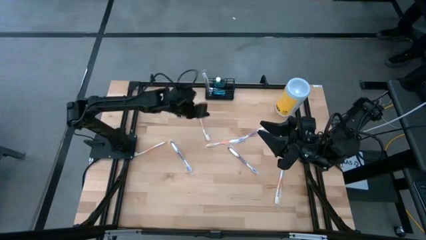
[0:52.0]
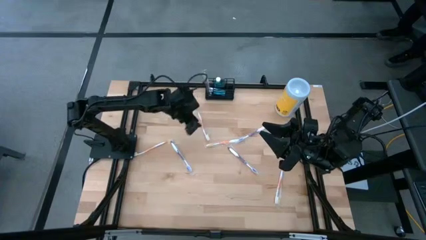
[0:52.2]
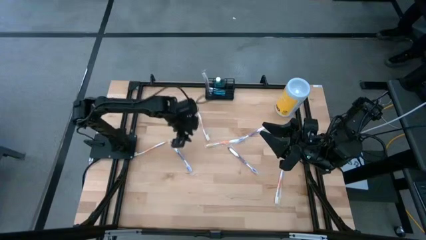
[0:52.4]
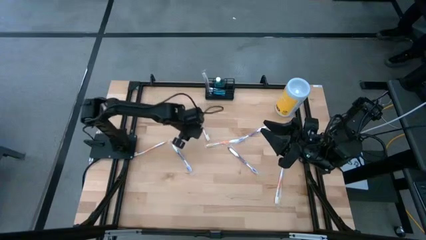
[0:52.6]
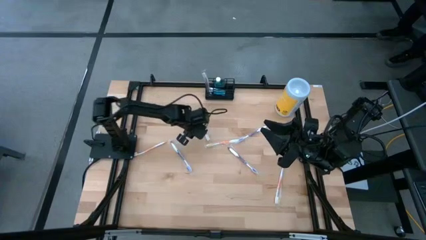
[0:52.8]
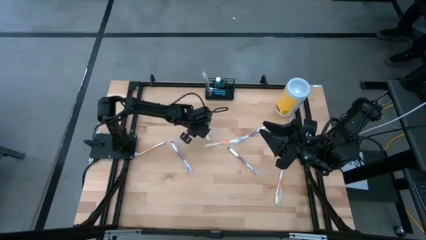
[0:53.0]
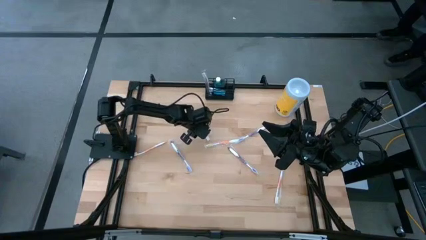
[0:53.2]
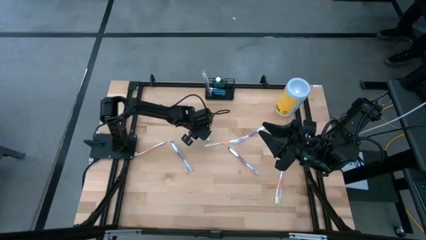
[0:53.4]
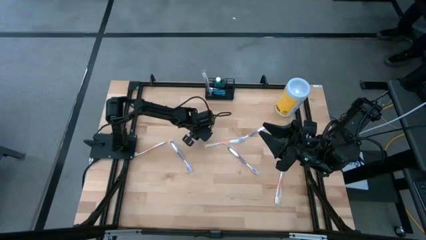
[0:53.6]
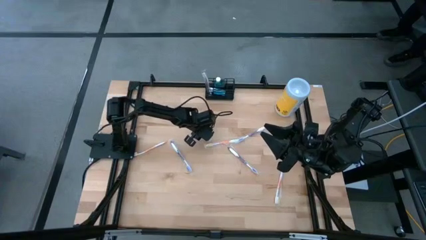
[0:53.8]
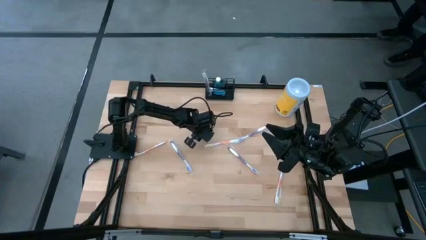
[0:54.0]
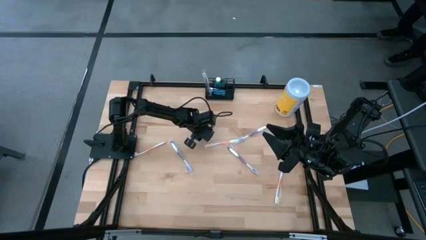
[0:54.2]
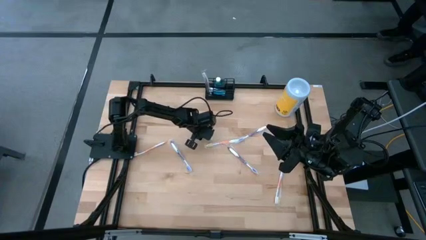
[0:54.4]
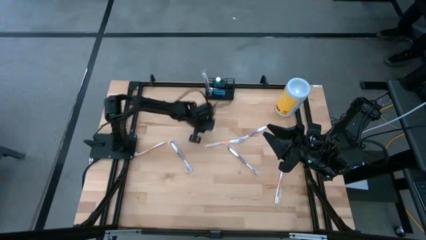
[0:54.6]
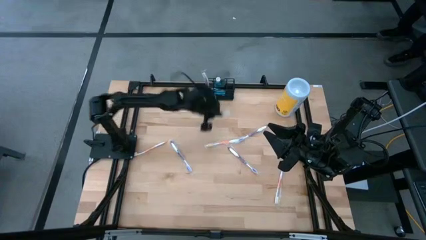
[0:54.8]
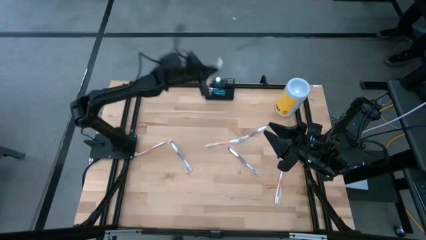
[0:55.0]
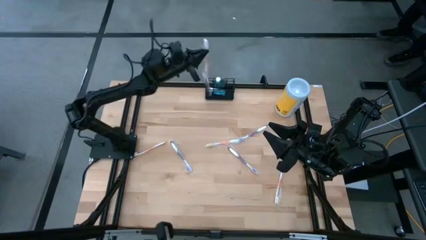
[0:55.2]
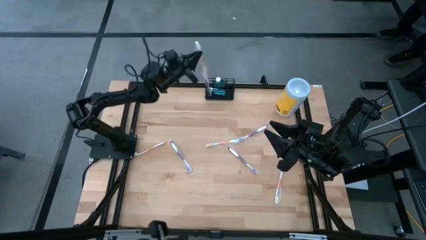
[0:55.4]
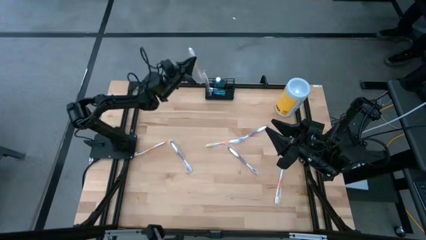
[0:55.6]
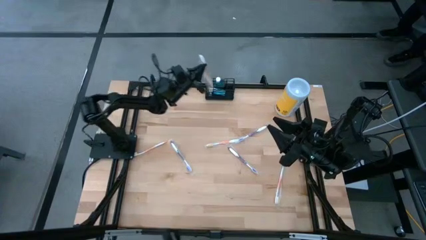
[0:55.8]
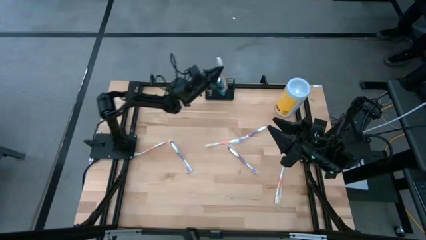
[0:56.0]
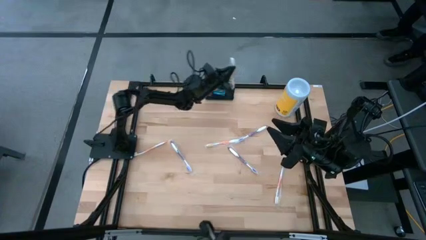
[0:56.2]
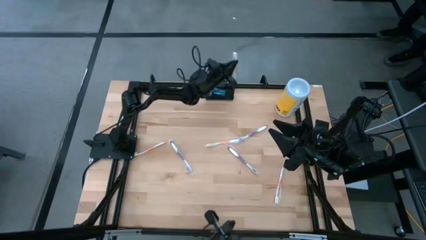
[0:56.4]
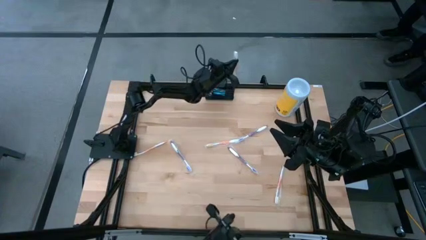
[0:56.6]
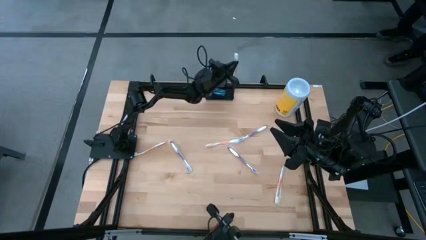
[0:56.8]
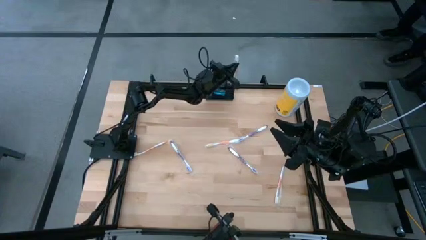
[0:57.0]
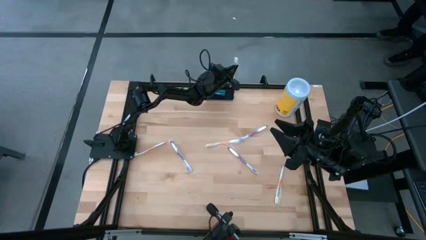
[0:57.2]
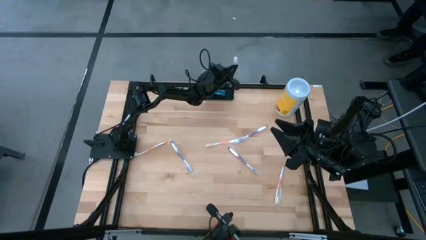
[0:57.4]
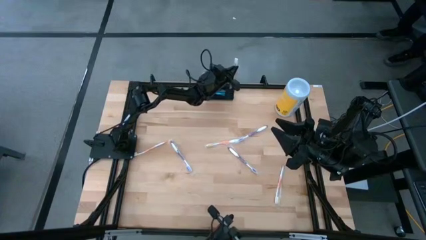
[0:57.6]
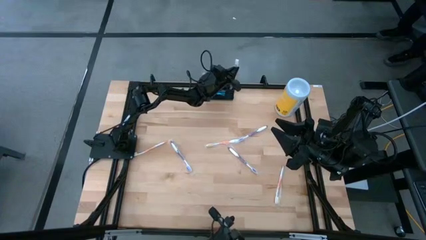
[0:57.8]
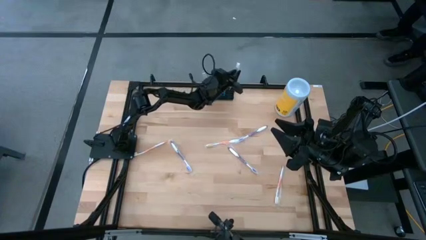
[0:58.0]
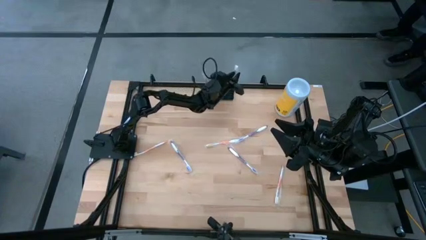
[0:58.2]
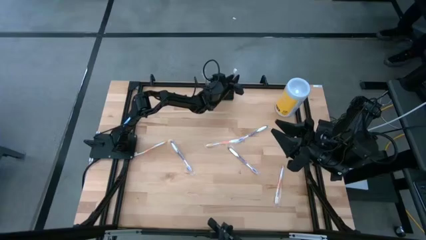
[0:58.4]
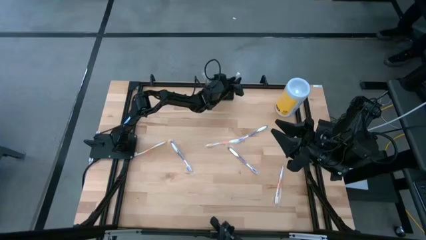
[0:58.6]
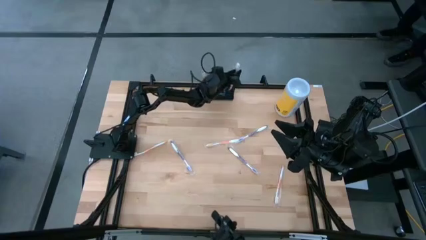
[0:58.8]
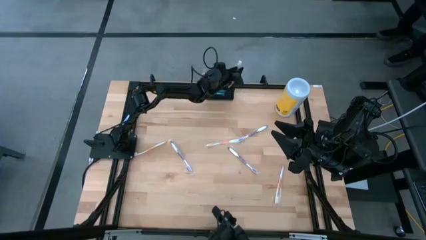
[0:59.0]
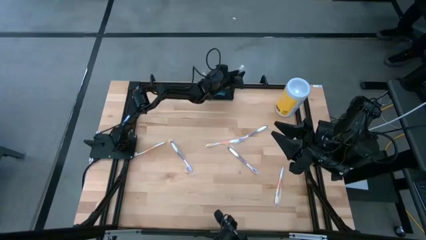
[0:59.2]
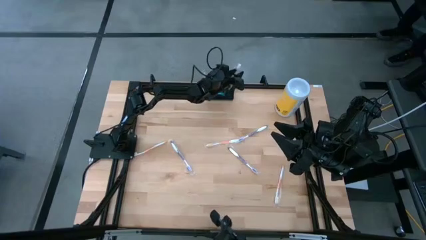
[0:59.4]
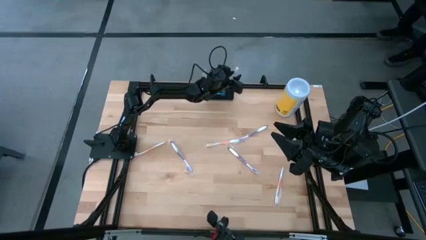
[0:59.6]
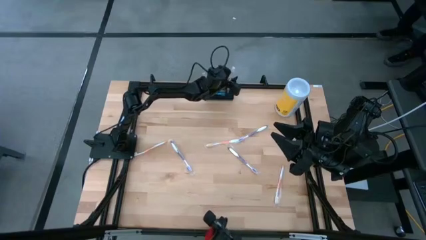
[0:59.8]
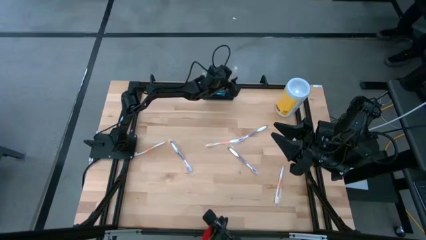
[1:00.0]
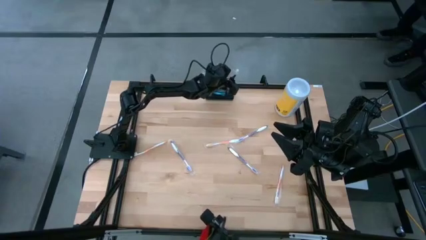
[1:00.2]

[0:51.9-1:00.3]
Task: Pick & Place toothbrushing station
Put the orange toothbrush into the black wire organizer bin

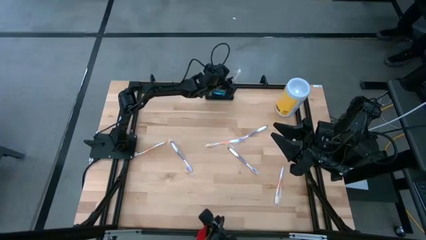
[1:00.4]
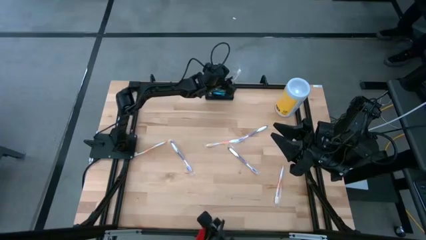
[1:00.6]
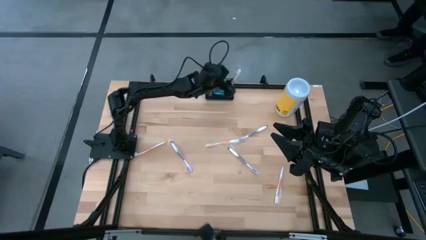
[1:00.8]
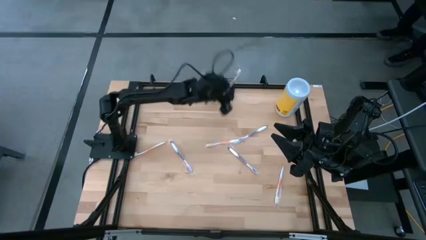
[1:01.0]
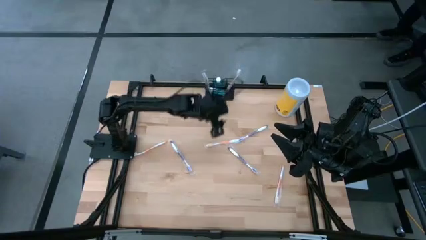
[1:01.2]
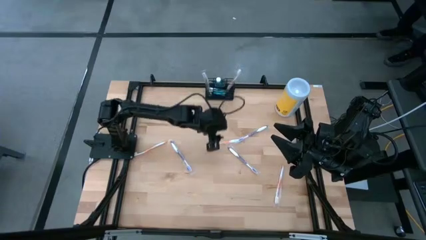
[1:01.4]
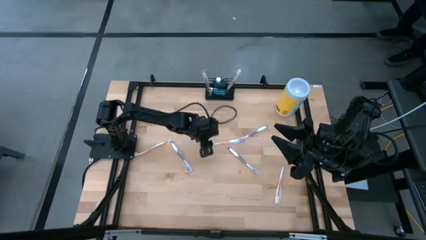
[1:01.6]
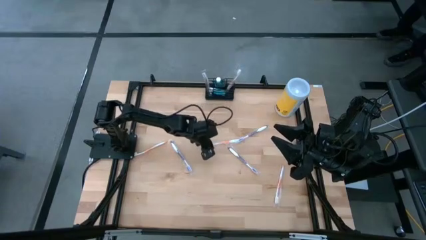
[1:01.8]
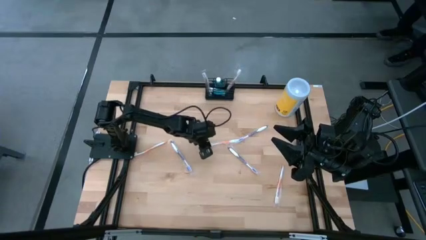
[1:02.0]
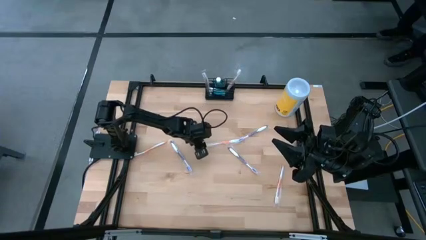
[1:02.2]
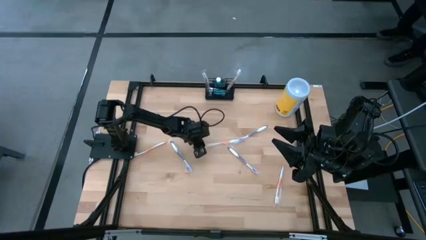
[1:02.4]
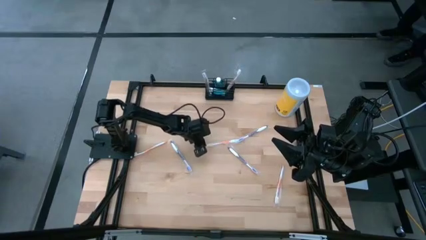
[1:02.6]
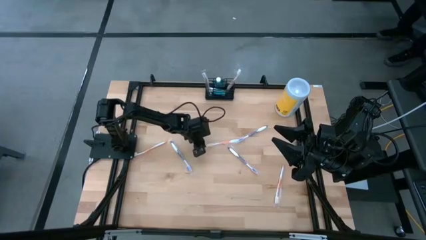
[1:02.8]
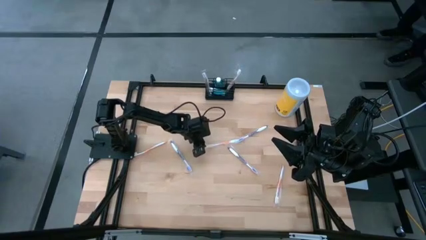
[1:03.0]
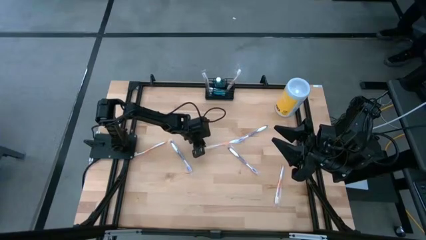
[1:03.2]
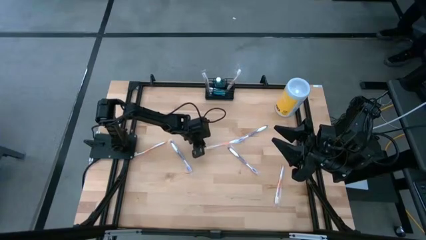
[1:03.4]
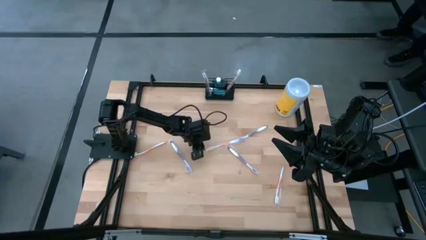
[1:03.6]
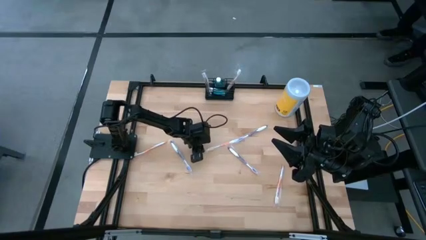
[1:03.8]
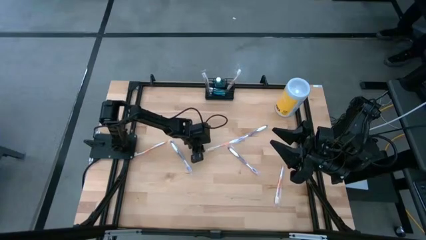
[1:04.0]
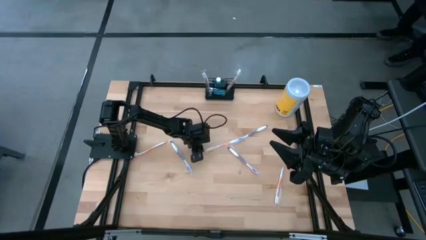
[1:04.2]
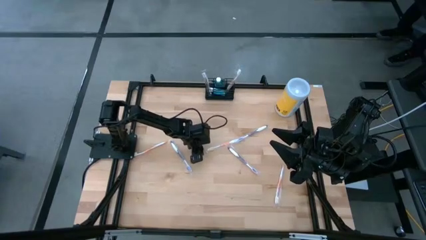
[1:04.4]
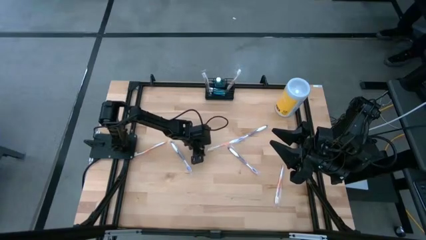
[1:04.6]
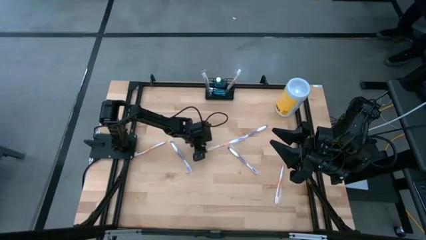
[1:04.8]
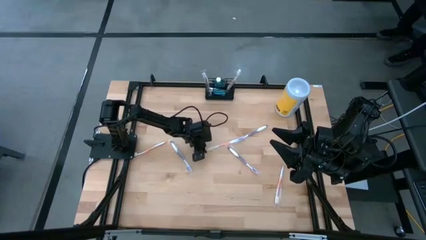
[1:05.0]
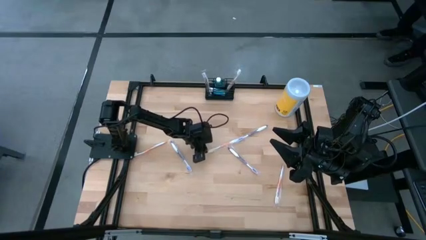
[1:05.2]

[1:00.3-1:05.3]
Put the orange toothbrush into the black wire organizer bin

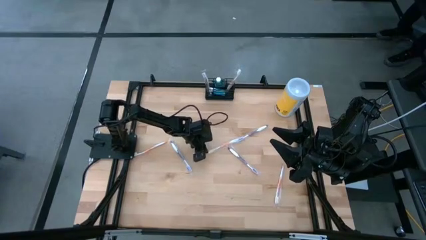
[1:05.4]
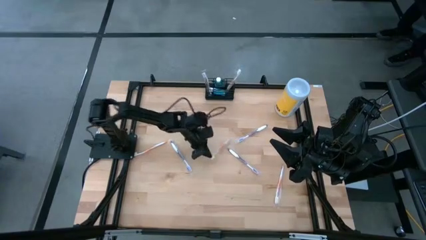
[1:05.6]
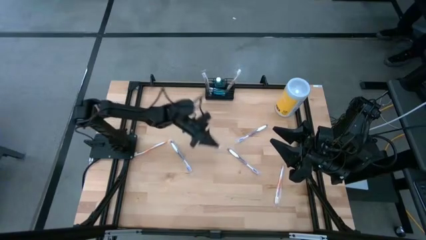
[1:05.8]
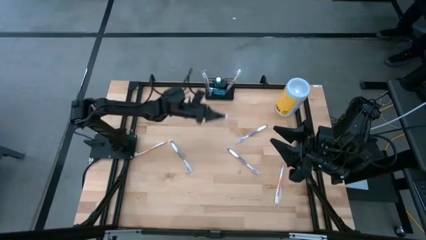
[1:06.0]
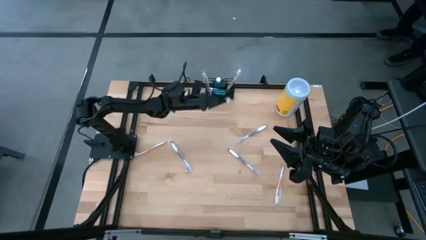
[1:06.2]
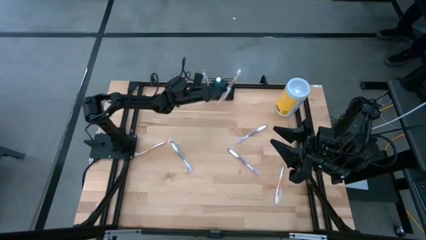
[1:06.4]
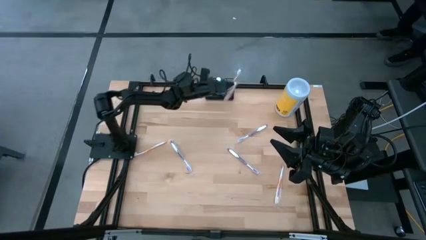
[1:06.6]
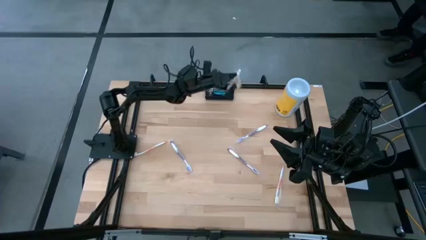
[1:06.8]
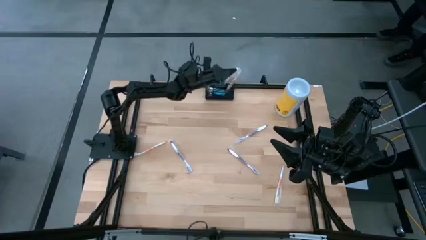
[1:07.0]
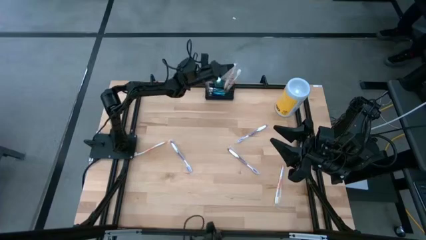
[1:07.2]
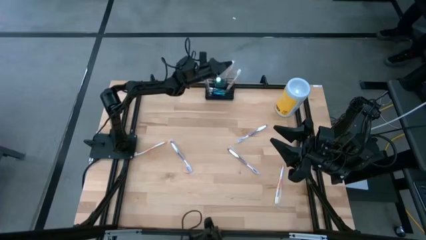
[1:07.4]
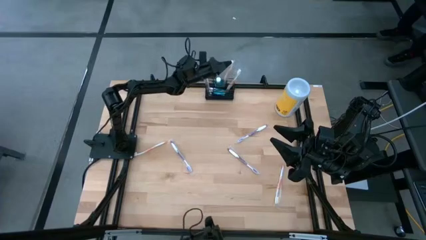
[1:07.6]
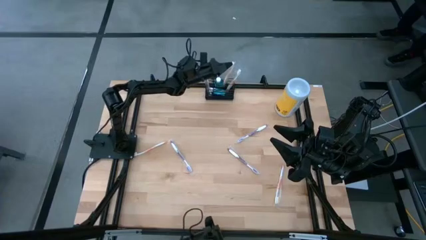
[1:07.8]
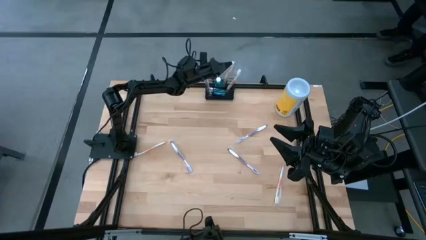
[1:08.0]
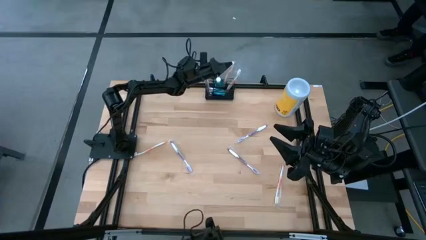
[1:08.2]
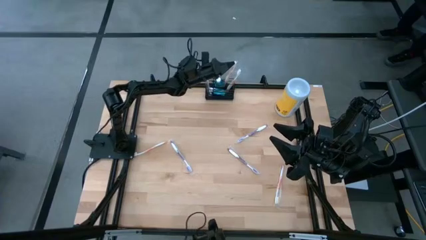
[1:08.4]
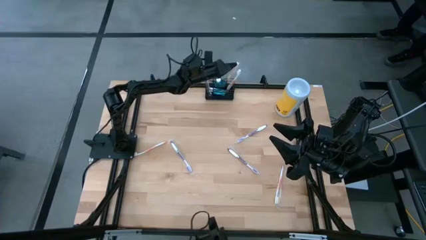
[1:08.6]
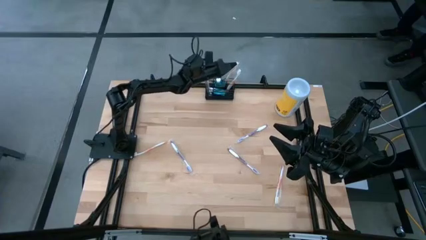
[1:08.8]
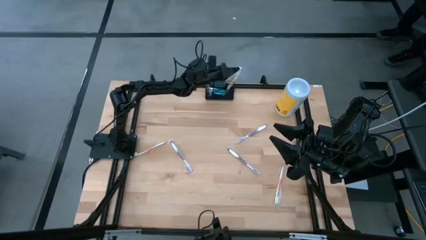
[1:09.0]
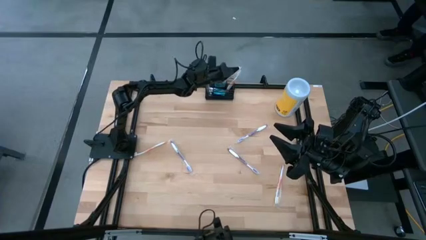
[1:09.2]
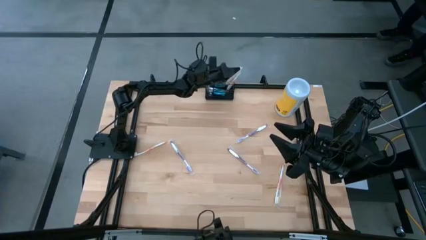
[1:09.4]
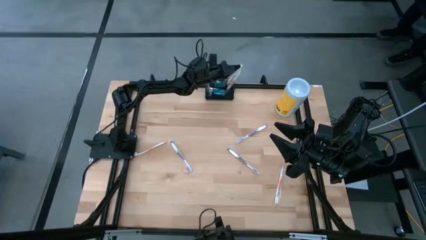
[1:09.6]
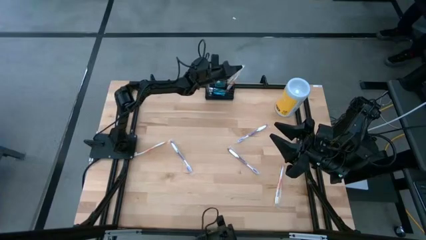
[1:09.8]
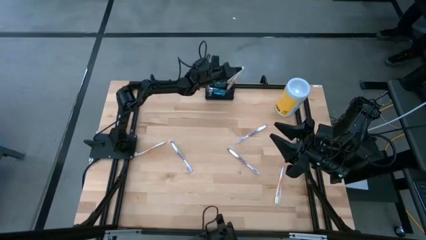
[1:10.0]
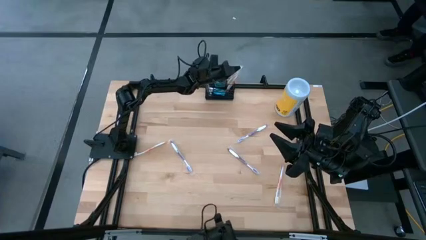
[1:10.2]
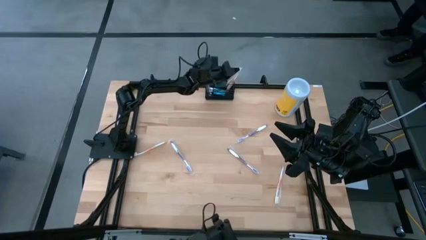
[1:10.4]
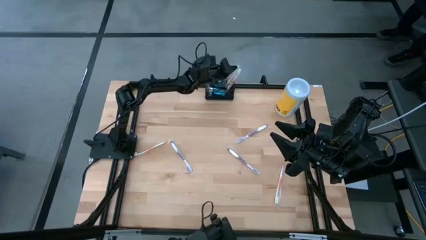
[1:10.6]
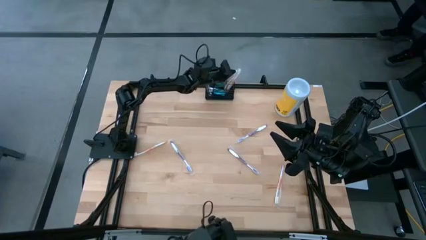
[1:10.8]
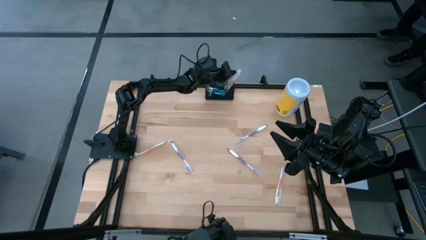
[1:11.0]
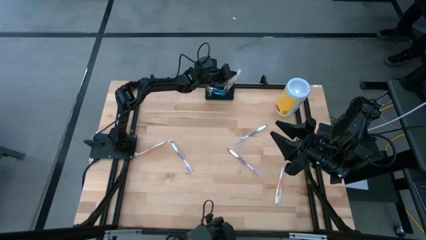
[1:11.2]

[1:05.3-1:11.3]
Put the orange toothbrush into the black wire organizer bin
